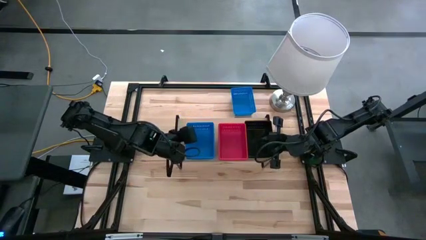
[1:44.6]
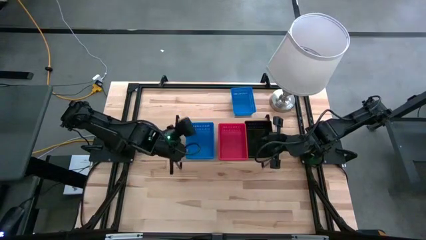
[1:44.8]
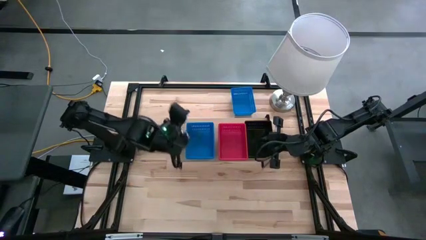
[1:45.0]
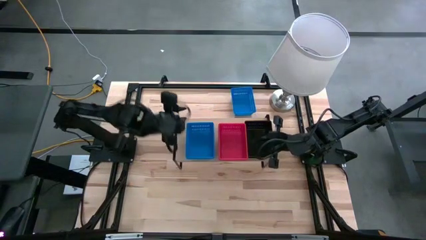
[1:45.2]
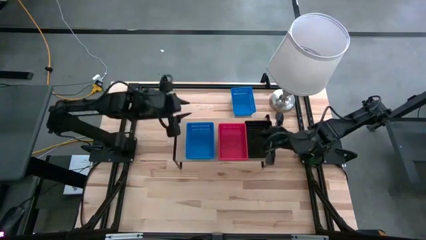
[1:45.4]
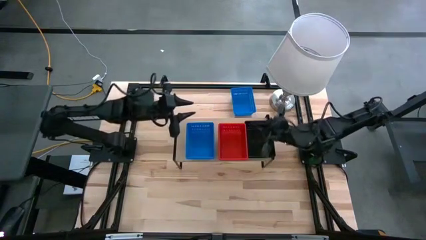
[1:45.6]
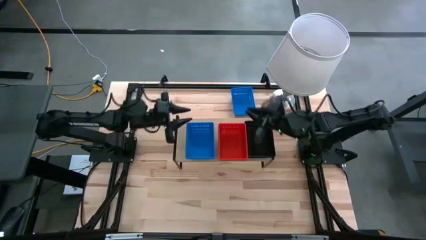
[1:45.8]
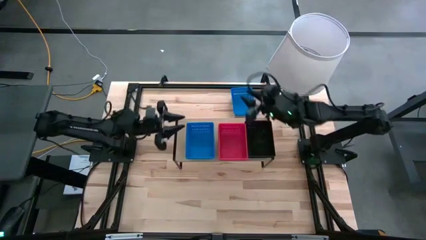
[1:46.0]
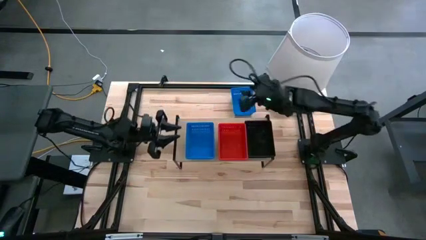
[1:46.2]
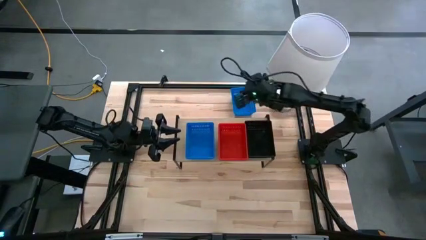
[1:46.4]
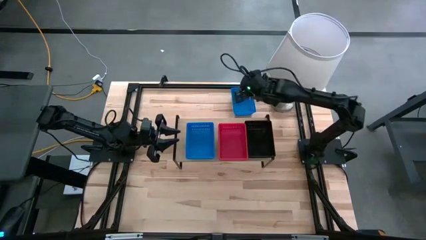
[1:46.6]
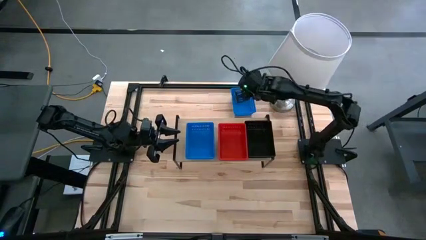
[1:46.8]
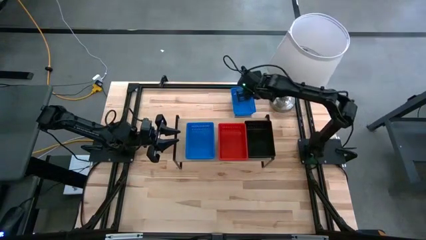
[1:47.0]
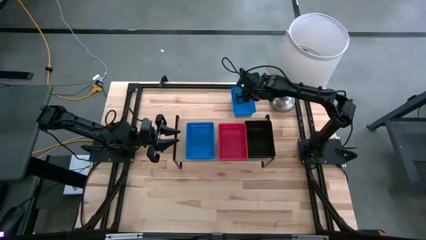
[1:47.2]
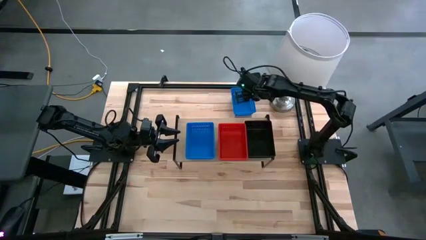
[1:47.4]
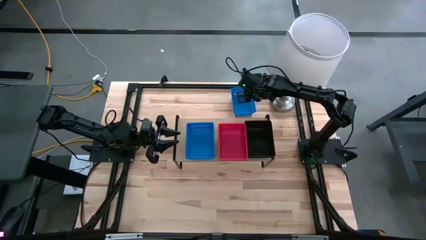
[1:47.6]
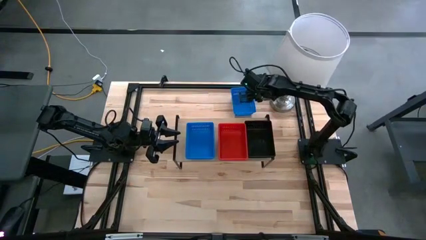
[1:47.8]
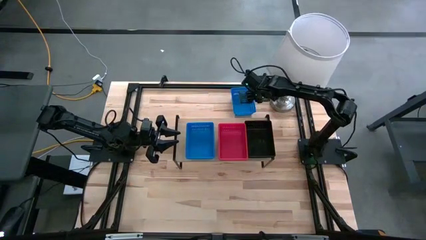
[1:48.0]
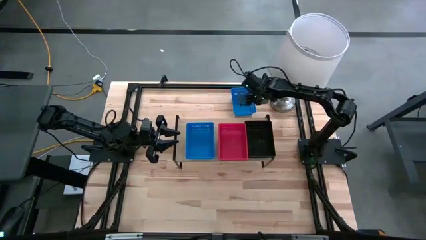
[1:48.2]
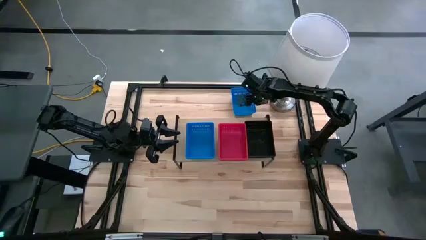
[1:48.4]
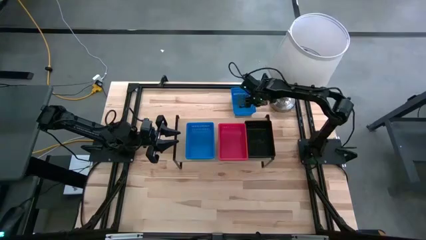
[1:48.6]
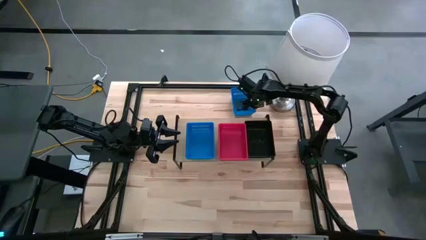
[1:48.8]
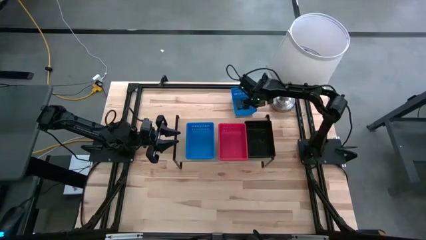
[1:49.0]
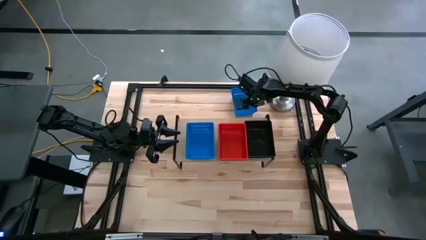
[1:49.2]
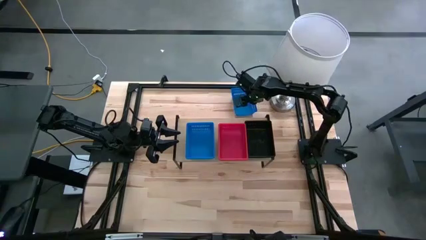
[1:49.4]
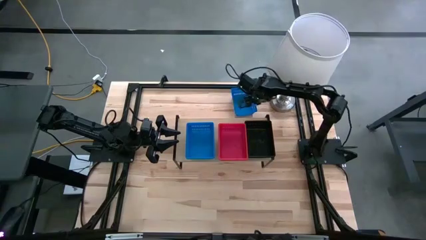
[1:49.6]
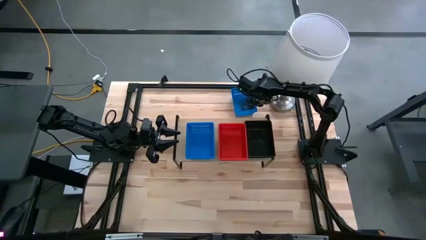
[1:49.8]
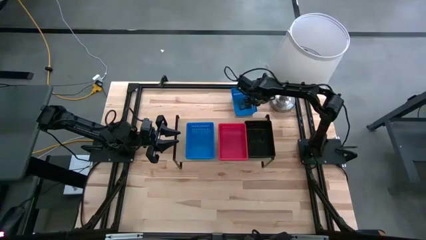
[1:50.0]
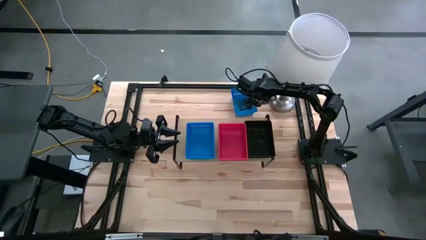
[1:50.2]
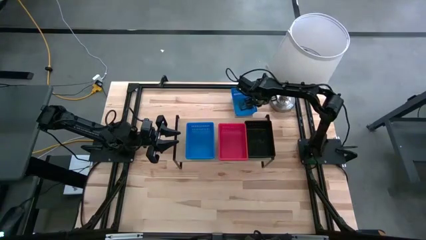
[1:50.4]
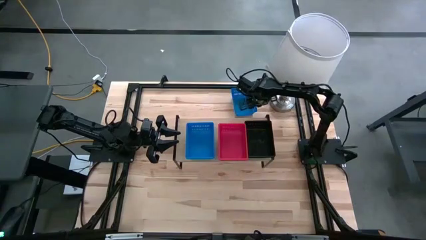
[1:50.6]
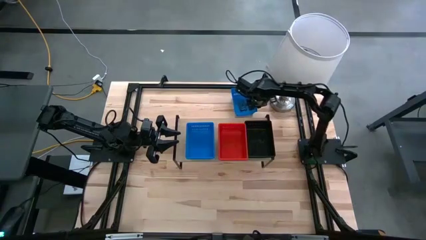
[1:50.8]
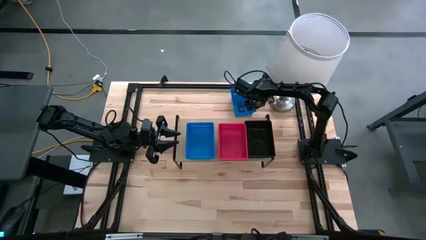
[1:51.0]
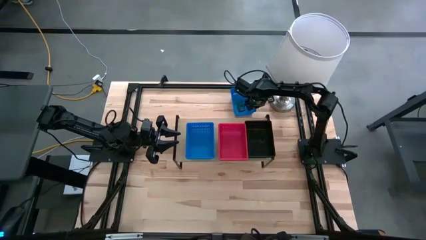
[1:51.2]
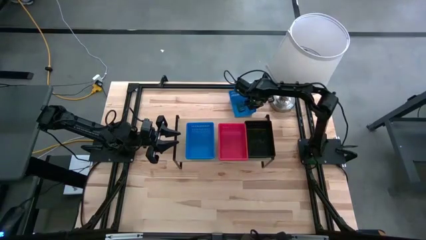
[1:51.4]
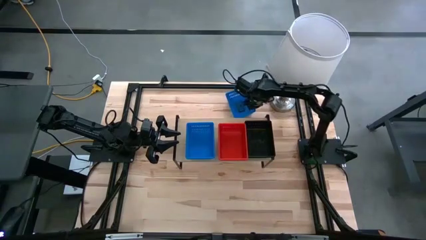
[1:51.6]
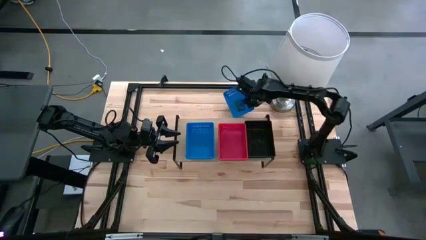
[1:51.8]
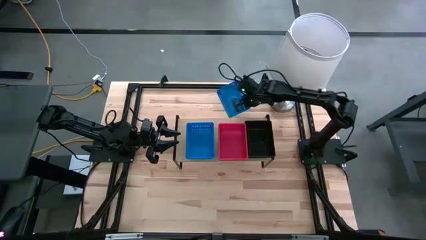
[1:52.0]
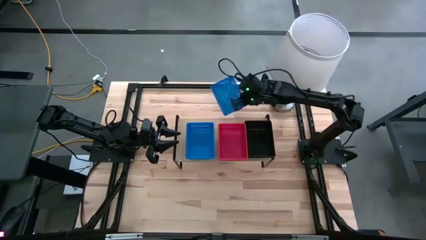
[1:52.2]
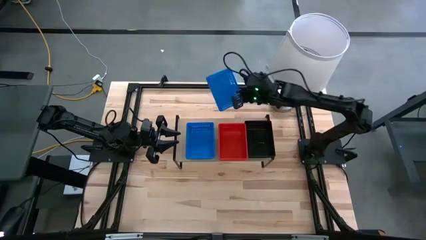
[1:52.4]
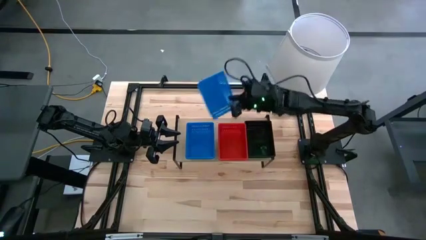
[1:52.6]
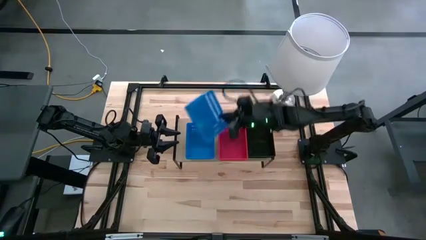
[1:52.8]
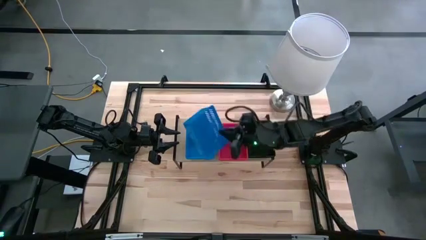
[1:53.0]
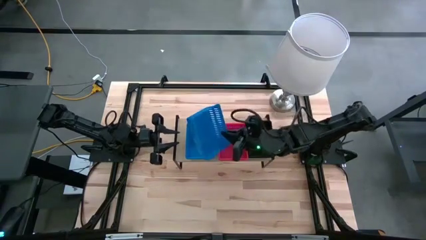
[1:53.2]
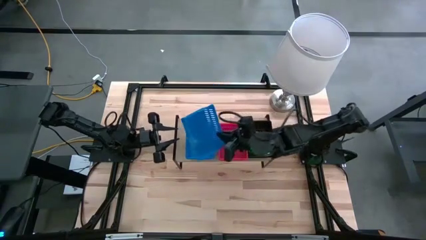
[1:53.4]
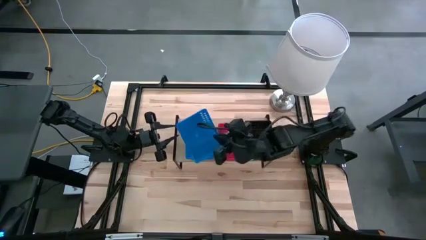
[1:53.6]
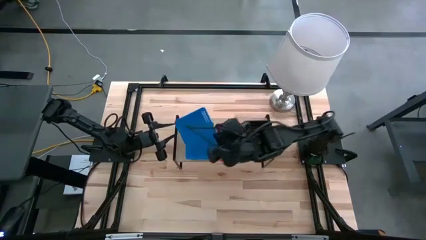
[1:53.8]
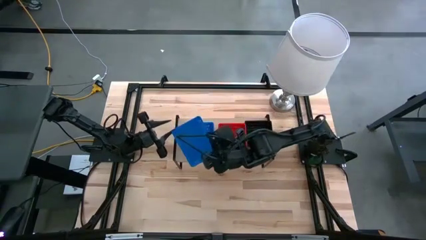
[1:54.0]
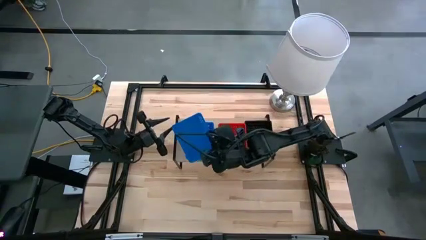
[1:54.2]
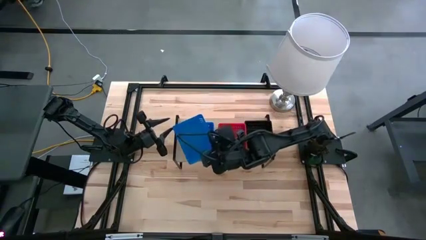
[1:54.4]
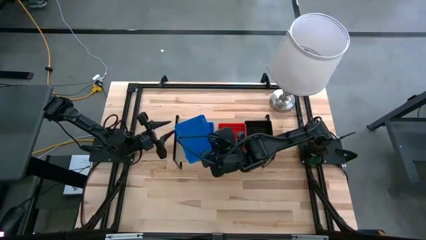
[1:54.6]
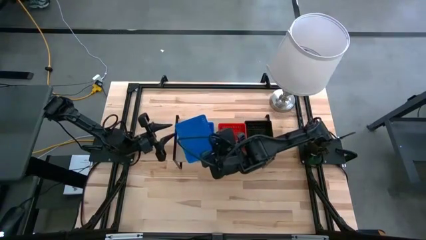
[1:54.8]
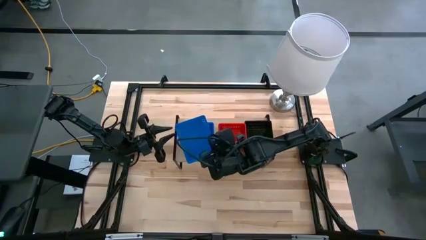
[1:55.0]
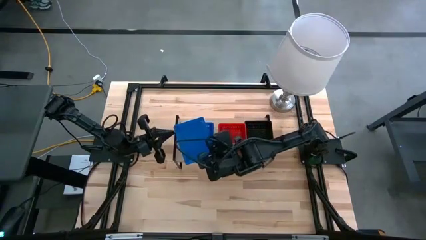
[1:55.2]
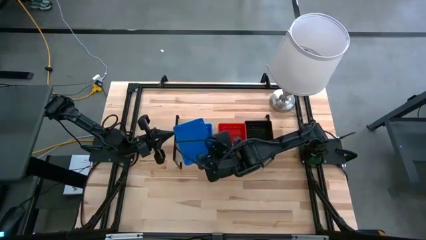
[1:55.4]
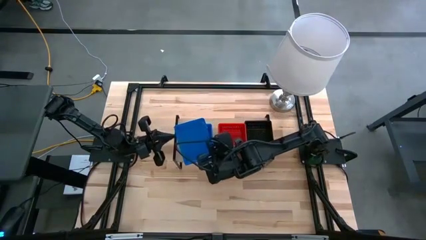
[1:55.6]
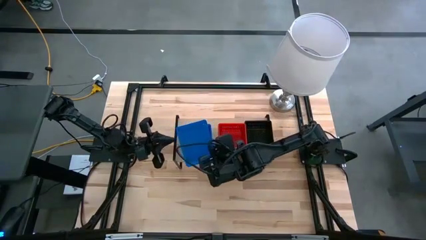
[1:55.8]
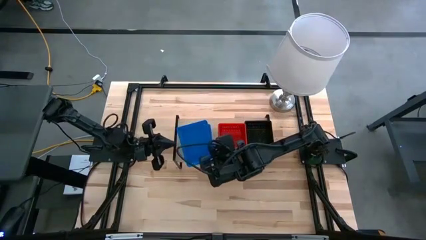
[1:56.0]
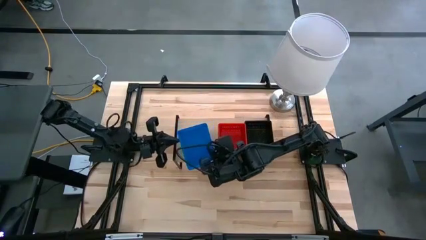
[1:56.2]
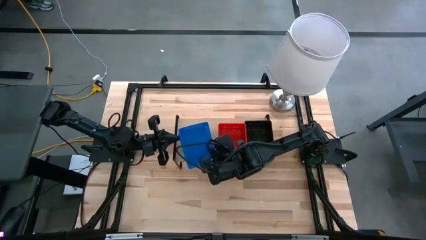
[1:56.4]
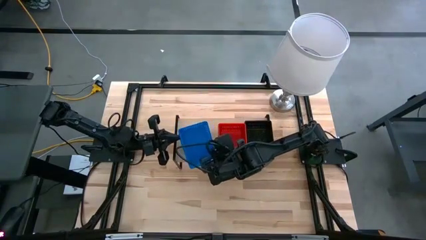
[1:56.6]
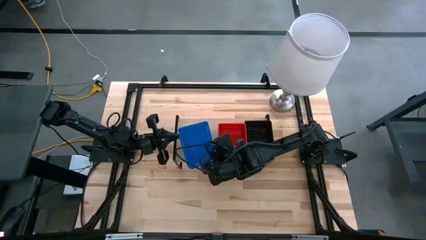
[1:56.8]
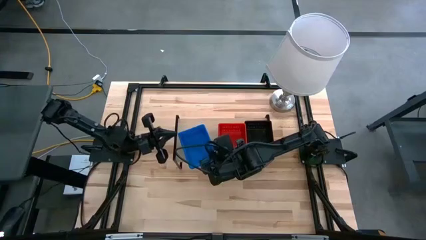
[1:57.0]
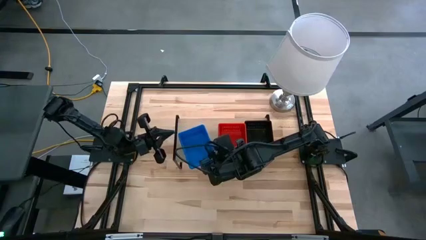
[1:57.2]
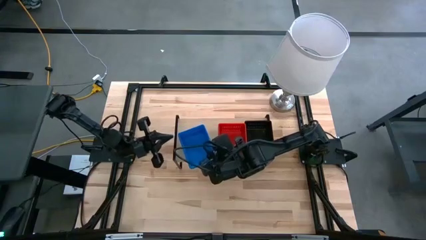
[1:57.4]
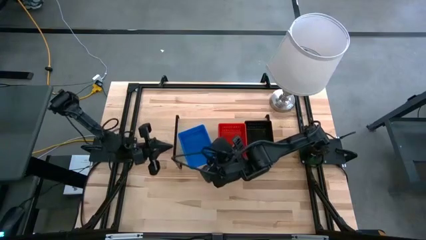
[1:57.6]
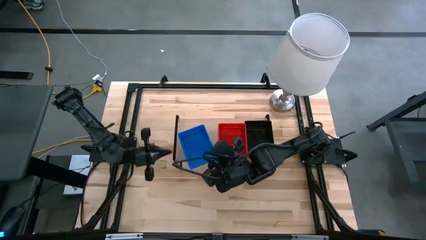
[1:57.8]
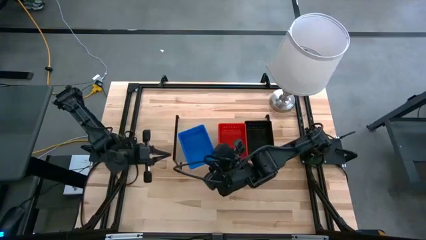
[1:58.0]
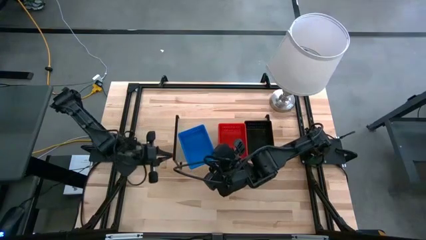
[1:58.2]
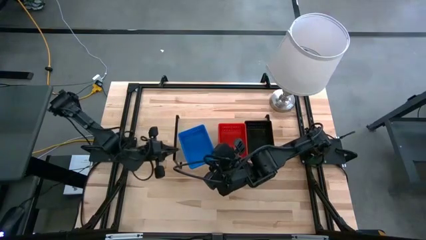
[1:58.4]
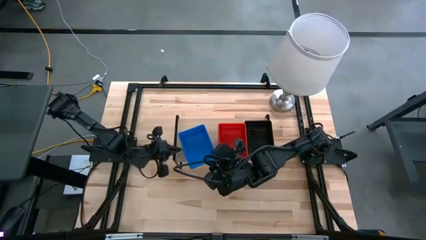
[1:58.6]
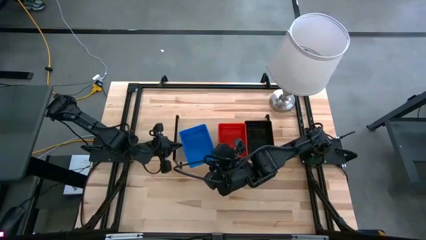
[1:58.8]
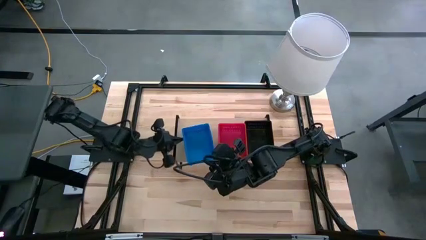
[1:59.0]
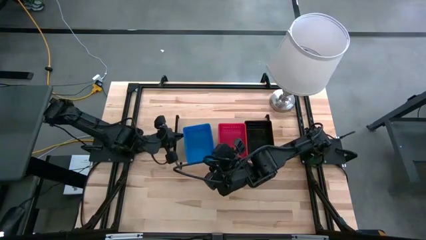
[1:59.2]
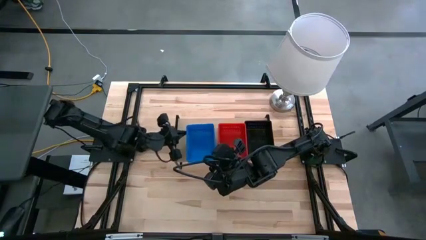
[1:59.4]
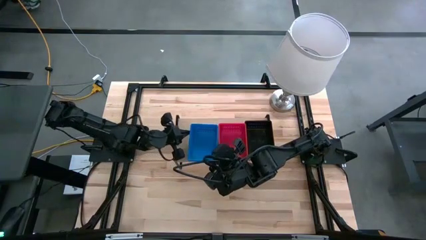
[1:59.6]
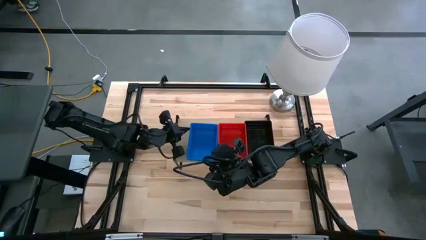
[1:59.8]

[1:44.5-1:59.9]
Task: Stack baskets on shelf by color
Stack the blue bin on the blue bins on the shelf

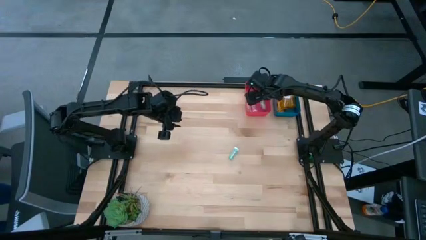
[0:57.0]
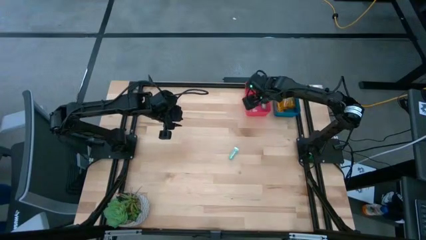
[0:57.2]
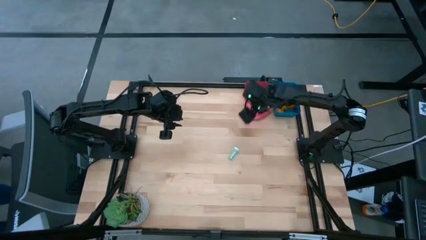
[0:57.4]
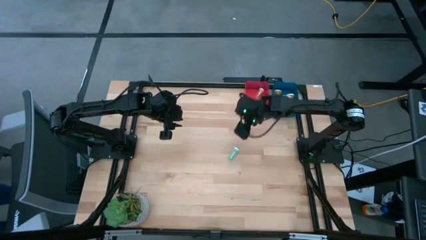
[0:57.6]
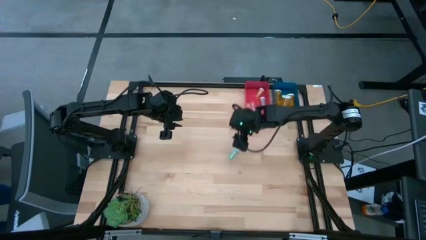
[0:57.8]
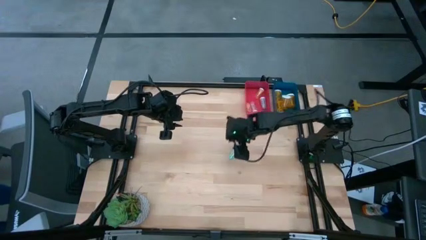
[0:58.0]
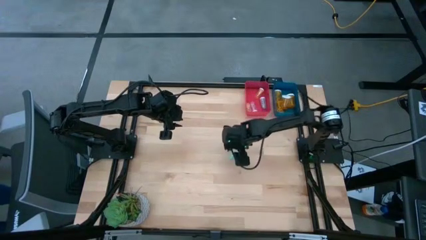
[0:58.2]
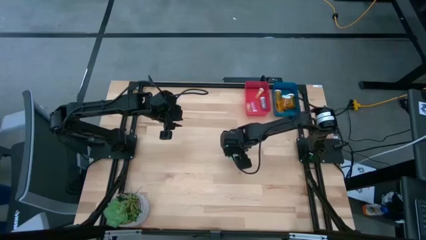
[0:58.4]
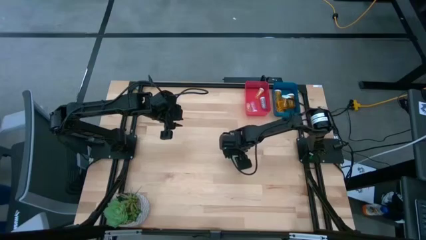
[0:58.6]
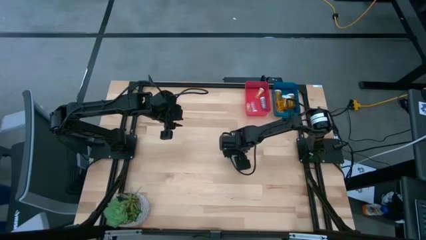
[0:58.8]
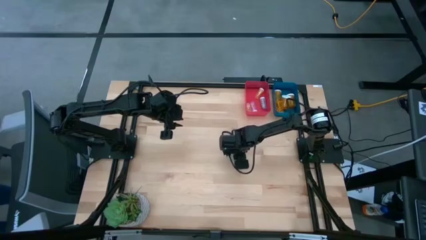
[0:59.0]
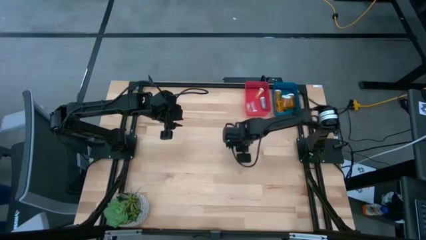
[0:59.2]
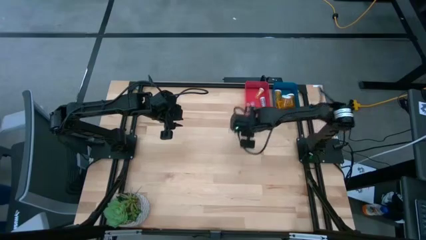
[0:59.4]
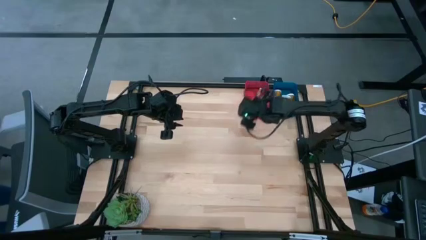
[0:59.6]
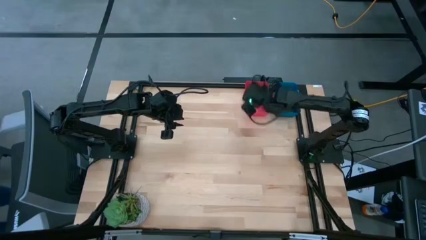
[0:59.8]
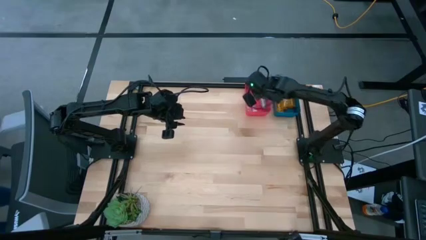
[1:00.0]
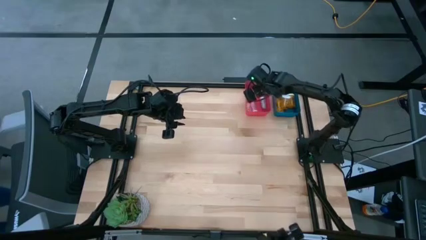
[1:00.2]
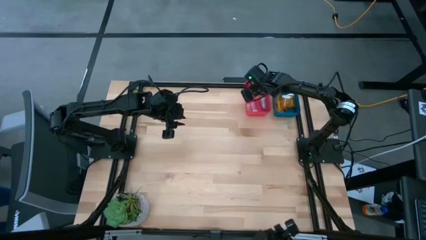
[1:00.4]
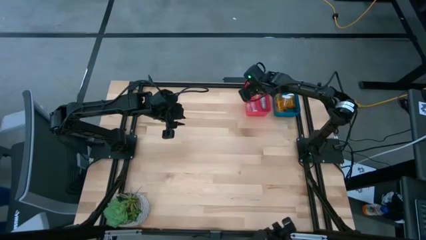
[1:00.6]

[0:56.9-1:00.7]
Task: Pick and place medicine bottles into bin by pill shape (circle, oval)
Put the blue tablet bottle into the red bin
